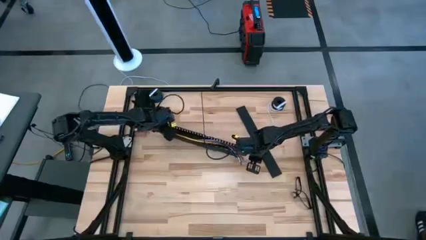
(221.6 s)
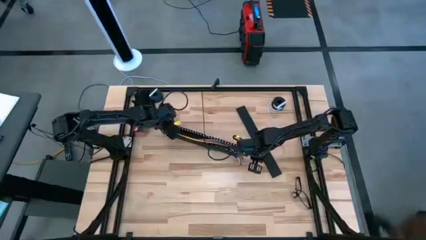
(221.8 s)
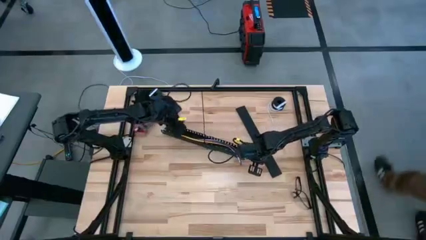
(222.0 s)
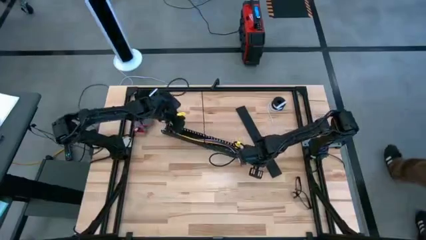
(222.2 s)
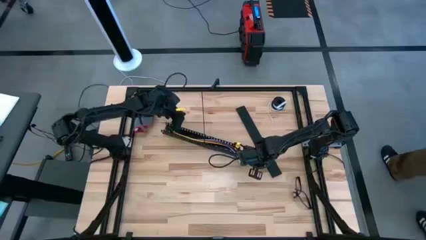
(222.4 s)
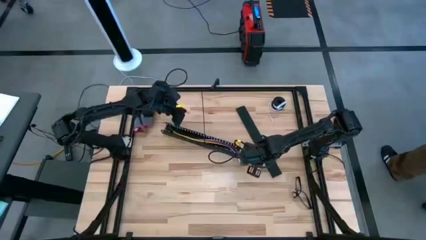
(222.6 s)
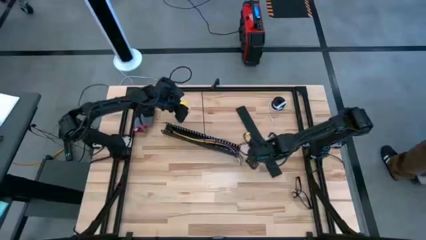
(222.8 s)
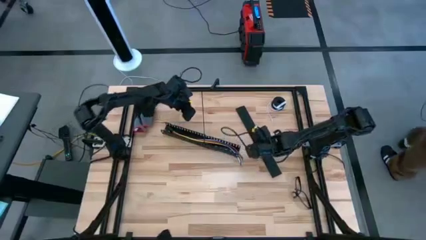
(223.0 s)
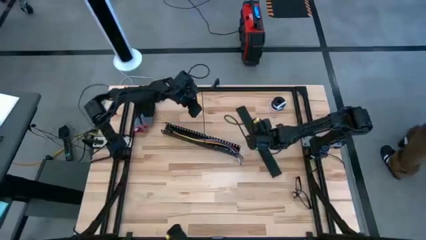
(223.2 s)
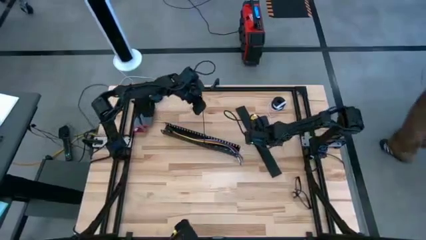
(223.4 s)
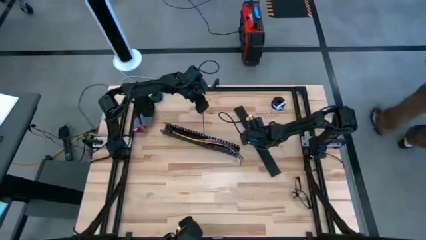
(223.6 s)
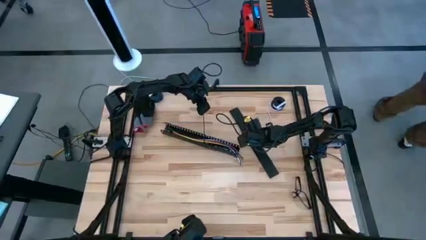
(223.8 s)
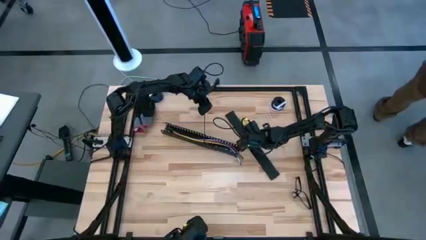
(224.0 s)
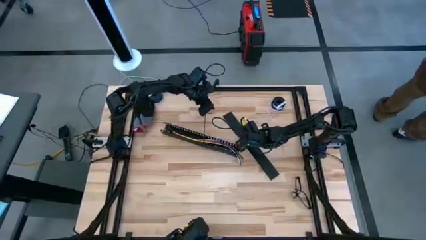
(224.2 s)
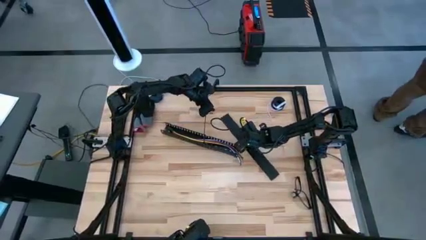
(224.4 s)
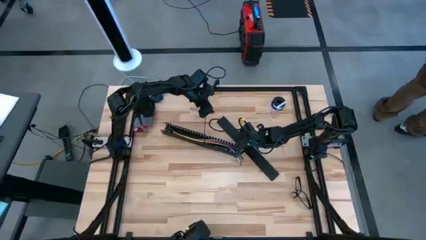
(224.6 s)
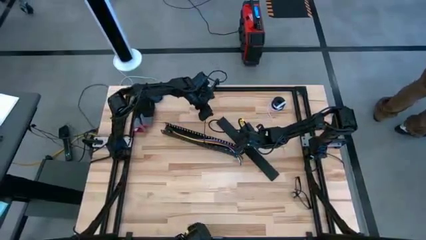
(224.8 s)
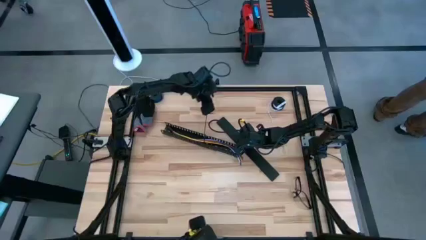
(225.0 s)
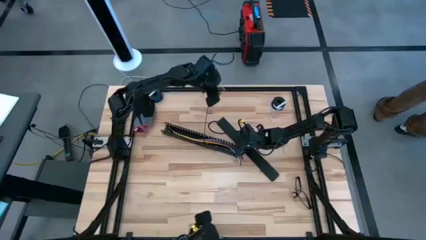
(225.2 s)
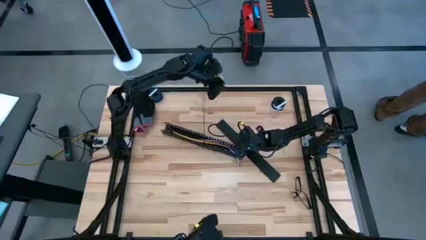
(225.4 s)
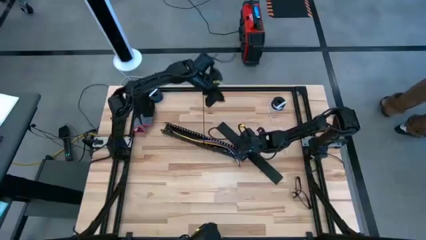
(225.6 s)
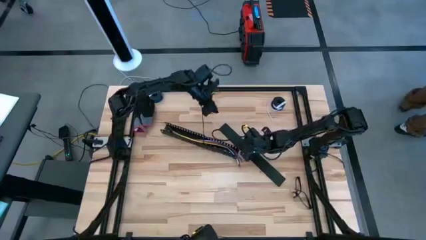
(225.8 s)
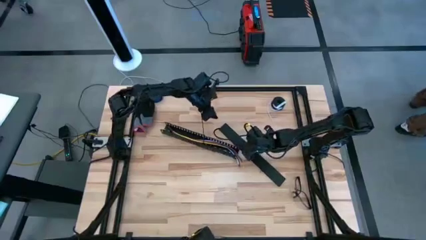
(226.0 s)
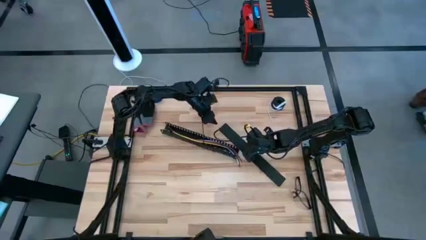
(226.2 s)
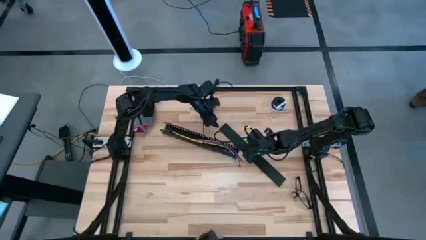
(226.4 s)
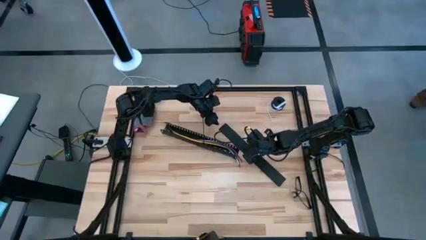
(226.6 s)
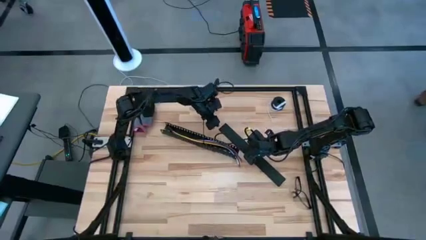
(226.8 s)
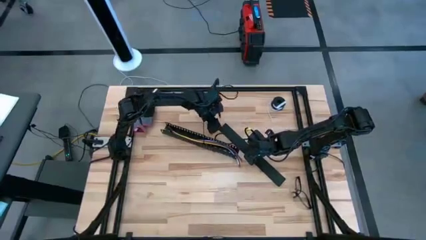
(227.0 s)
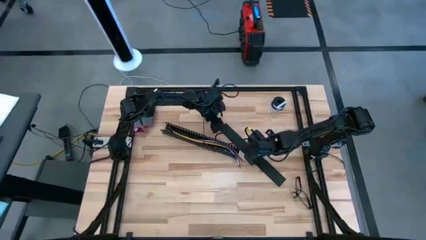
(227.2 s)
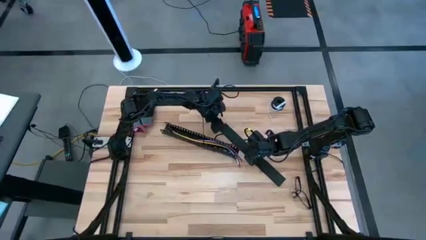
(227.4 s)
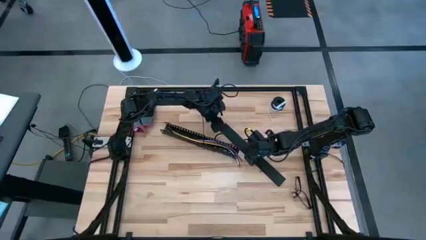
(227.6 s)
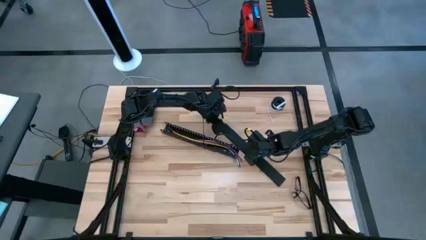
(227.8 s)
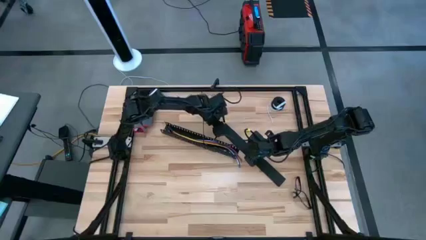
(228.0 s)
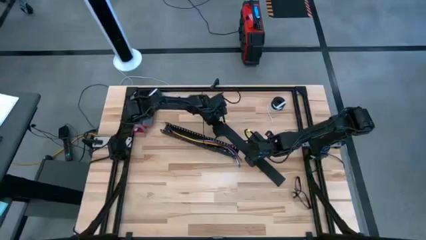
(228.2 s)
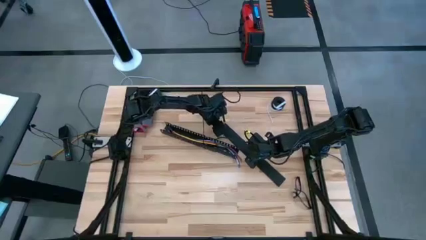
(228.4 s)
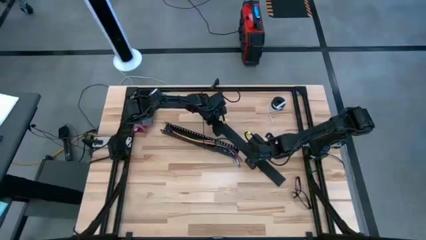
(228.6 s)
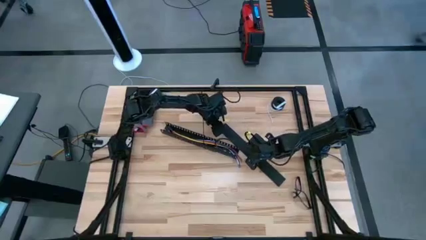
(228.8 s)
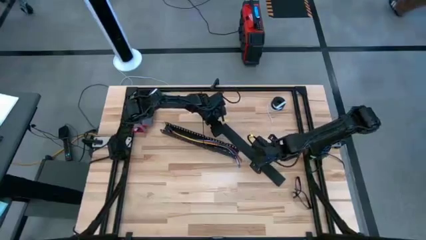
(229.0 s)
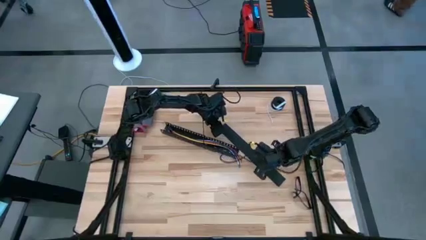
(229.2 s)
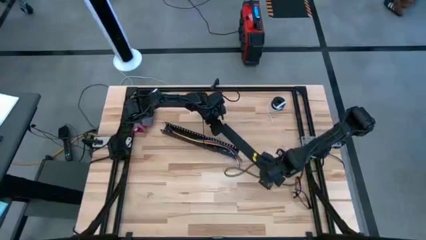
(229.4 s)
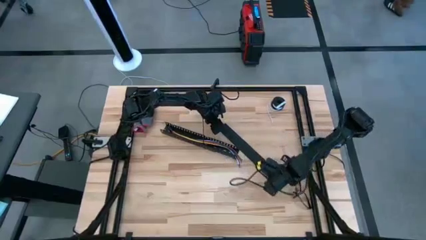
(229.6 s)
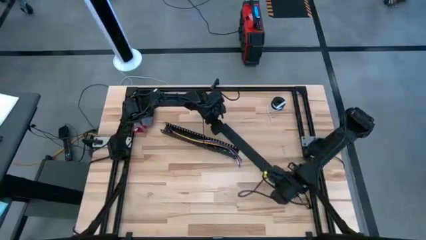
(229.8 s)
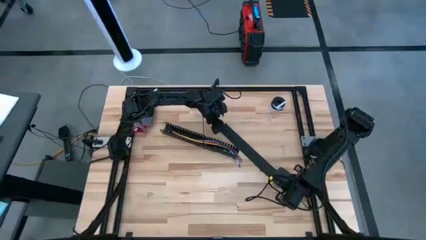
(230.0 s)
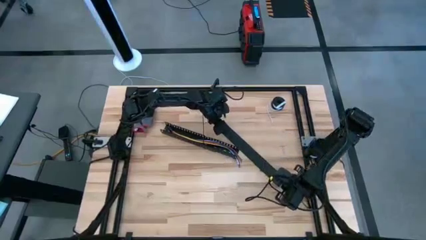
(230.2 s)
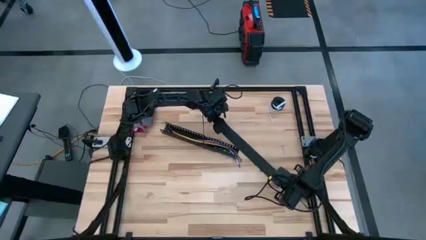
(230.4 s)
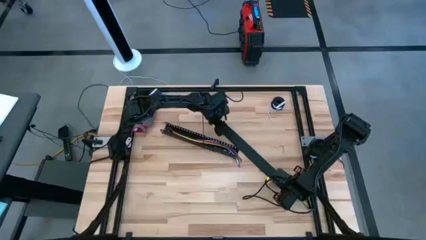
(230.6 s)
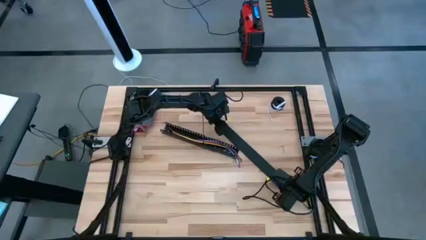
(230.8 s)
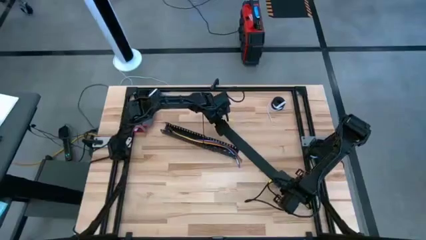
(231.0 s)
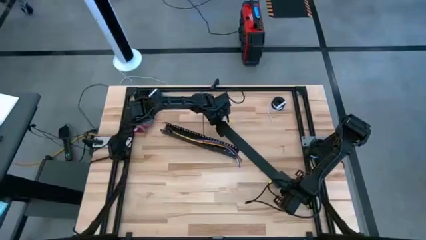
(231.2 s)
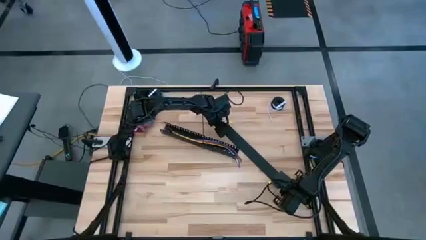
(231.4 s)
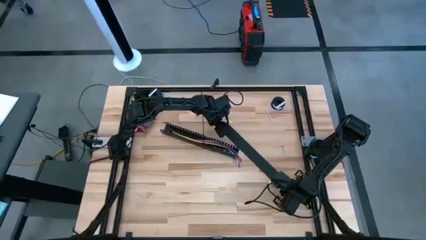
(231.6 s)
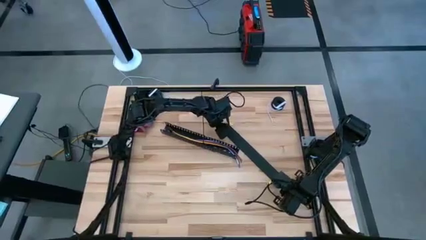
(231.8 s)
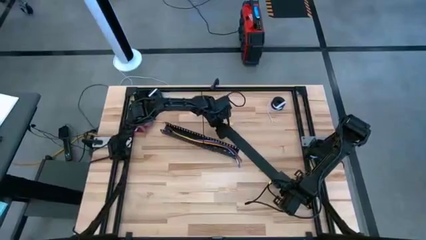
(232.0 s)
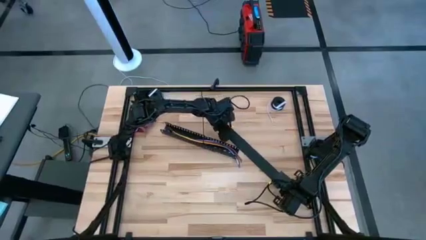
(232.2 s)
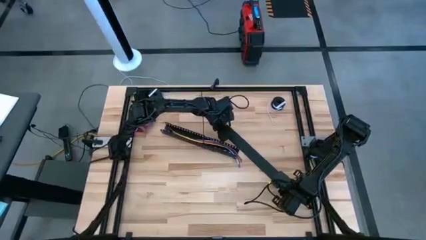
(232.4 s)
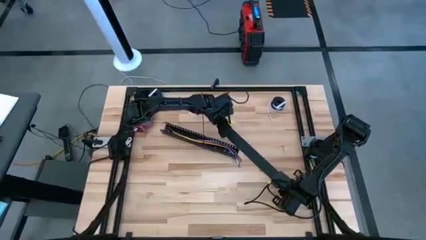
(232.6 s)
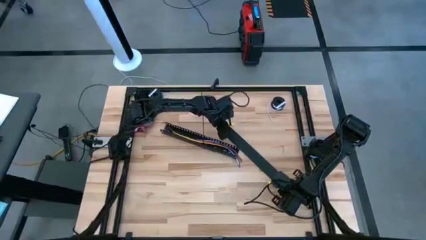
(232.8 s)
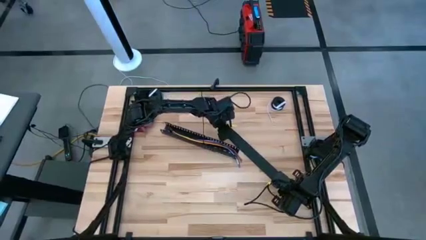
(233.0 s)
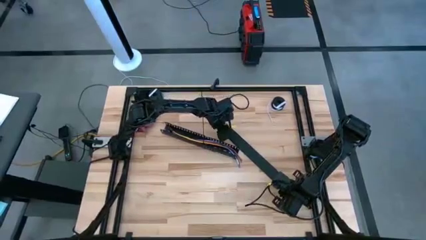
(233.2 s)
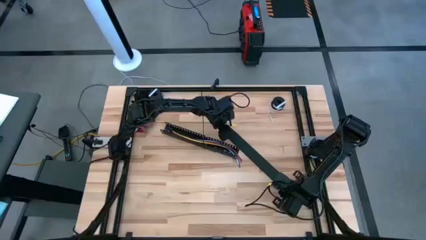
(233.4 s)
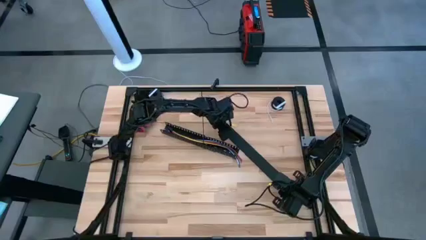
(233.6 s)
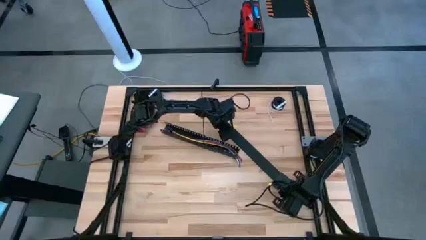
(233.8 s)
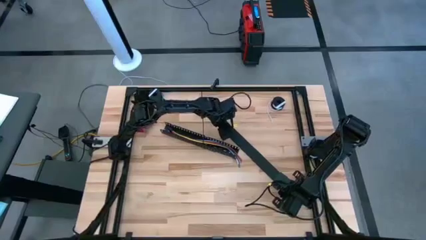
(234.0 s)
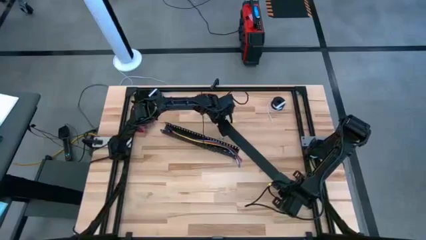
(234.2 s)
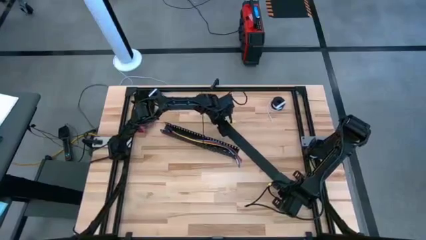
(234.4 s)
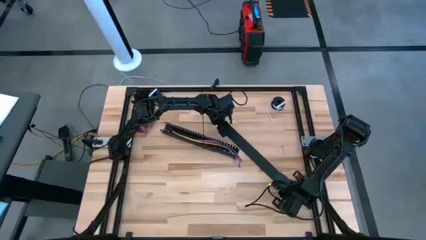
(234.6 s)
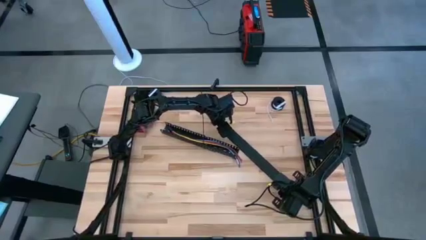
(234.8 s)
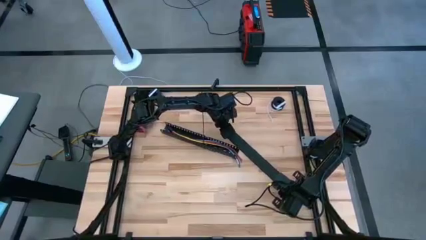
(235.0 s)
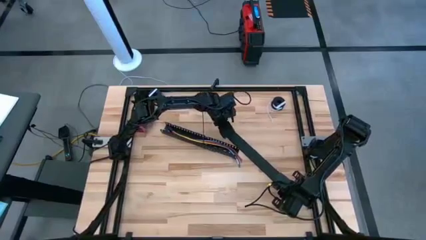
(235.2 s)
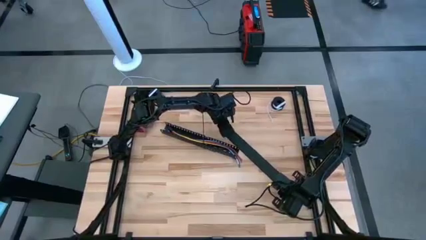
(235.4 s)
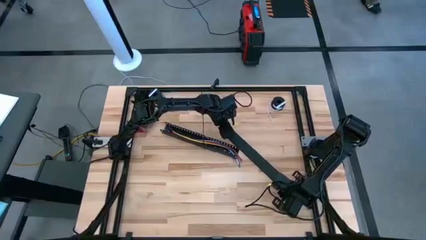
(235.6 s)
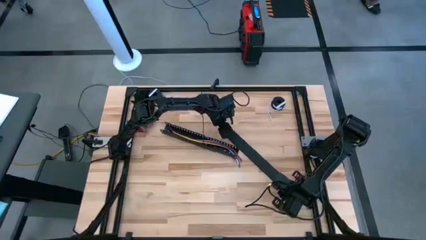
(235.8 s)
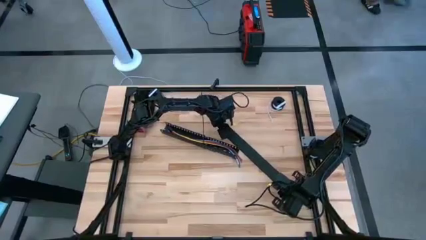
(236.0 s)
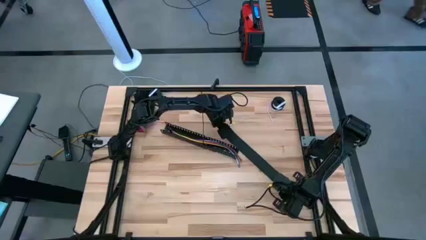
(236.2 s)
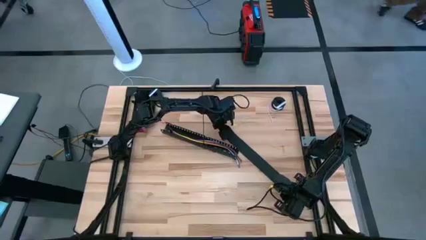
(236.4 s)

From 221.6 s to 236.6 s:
Task: Ziptie cables
Close the black cable duct

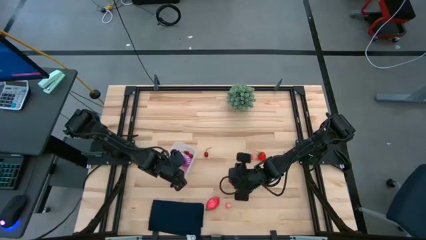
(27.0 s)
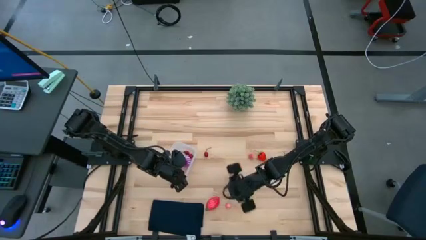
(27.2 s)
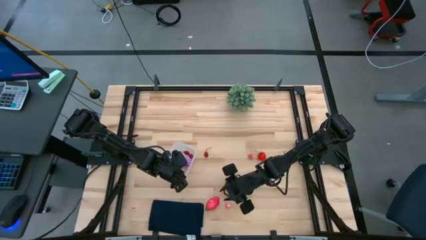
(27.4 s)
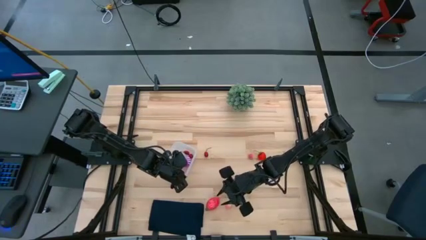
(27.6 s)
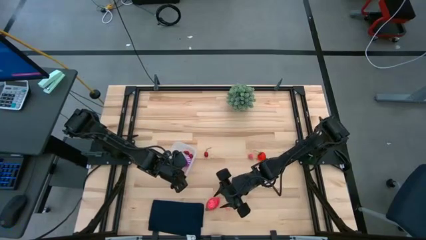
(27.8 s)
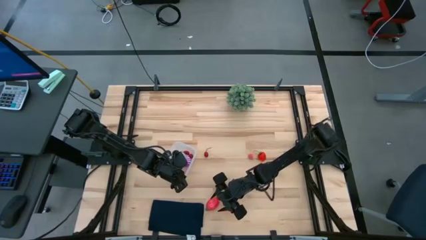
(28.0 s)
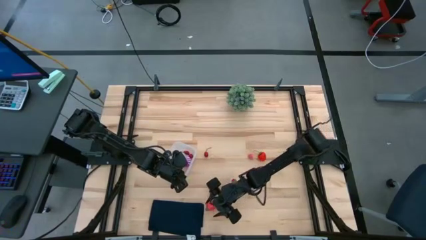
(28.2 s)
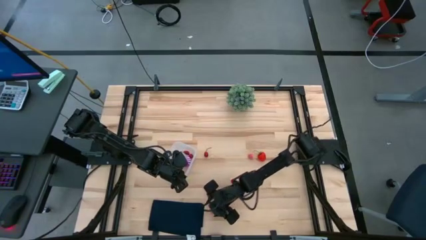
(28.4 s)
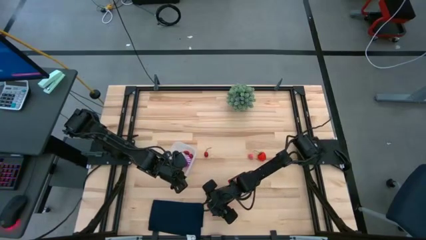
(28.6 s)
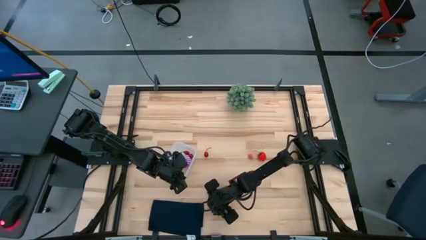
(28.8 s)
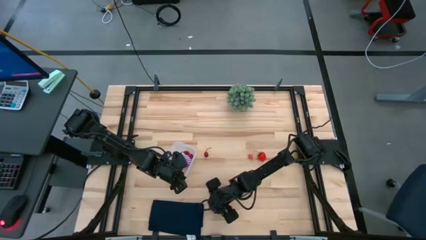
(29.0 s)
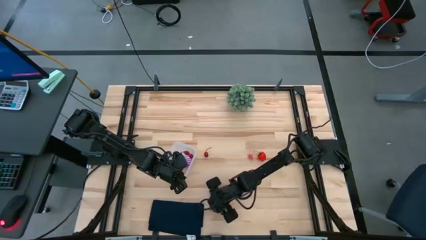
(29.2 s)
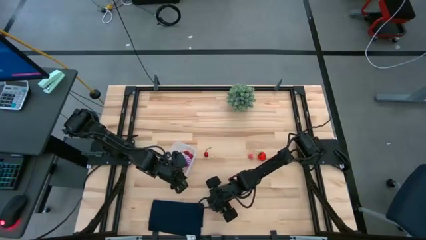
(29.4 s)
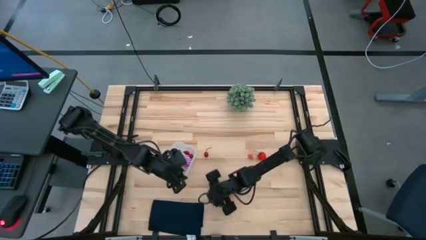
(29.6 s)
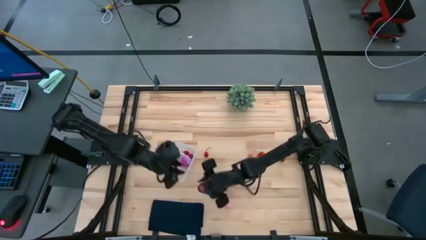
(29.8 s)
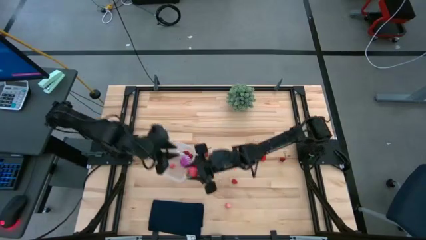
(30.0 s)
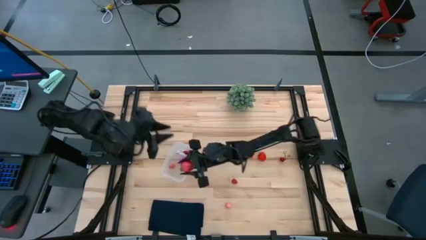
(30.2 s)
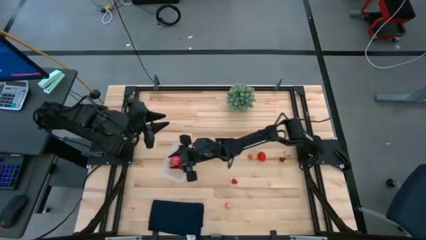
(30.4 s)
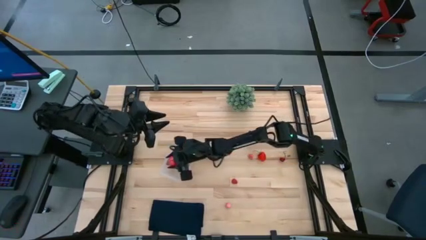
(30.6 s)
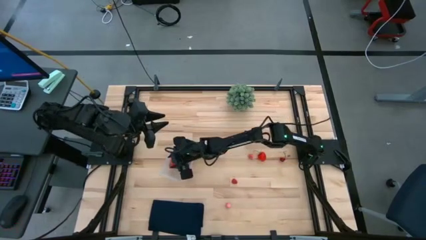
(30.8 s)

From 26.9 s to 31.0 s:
Task: Pick and placing Produce into tupperware
Put the red dragon fruit into the transparent bin
